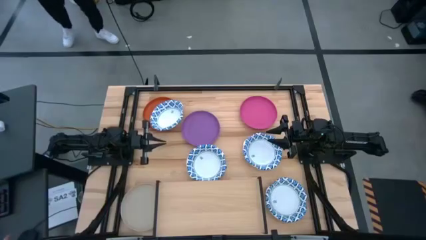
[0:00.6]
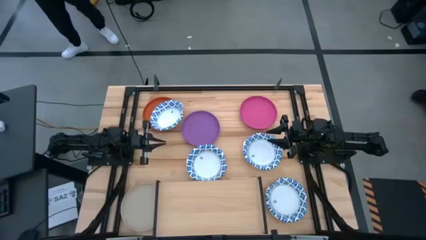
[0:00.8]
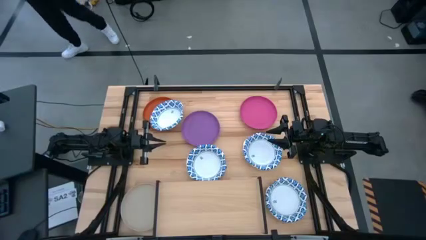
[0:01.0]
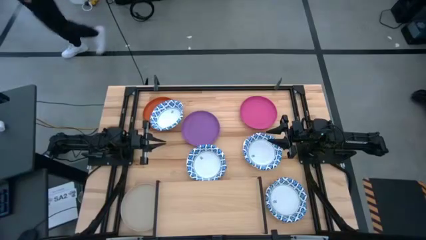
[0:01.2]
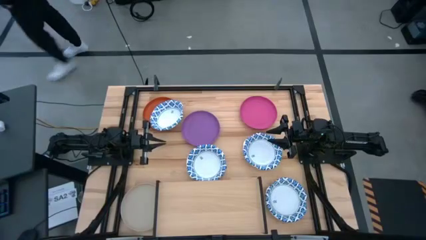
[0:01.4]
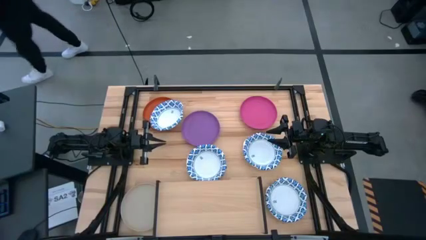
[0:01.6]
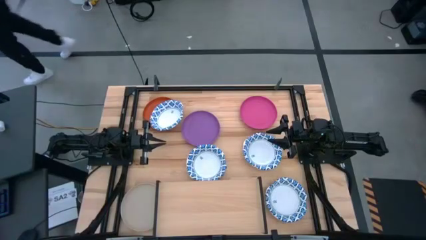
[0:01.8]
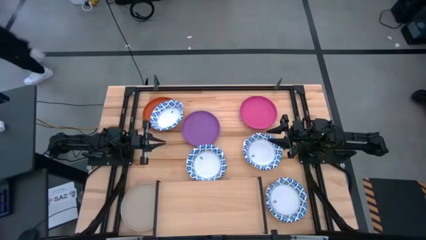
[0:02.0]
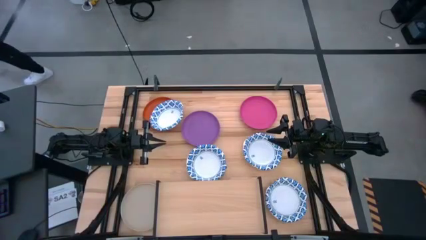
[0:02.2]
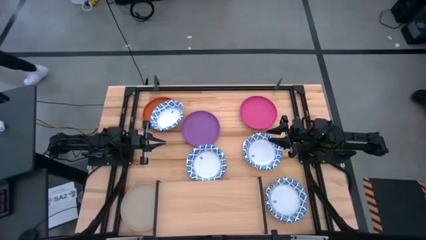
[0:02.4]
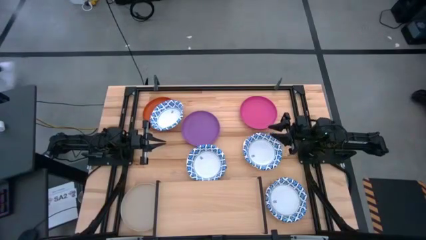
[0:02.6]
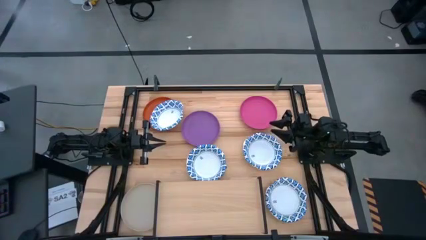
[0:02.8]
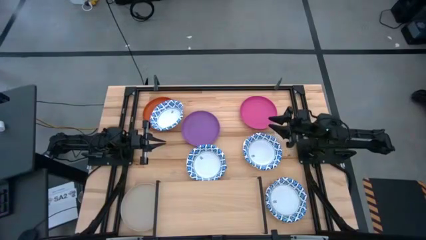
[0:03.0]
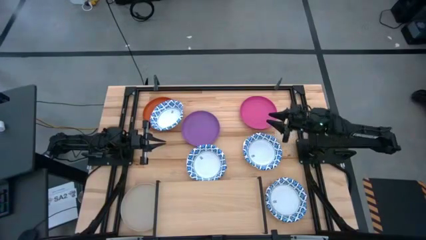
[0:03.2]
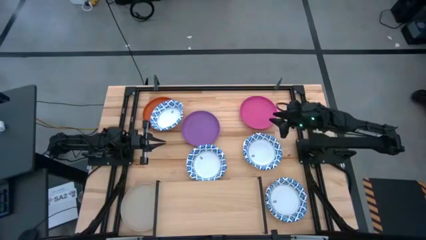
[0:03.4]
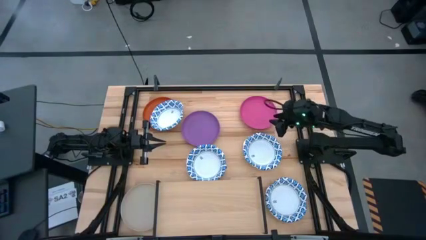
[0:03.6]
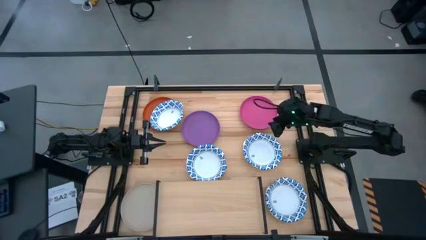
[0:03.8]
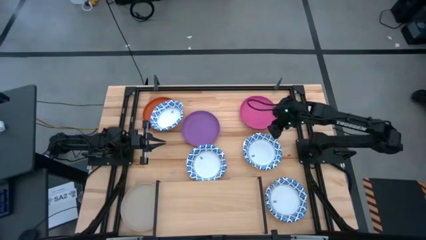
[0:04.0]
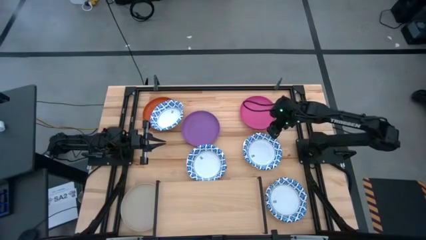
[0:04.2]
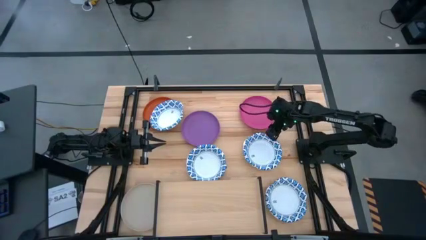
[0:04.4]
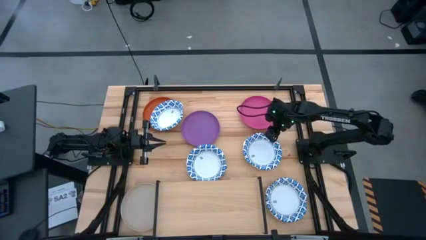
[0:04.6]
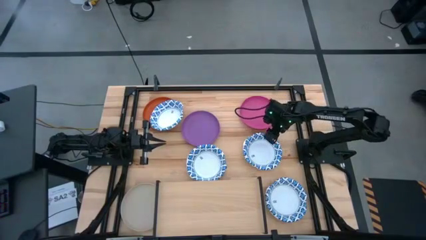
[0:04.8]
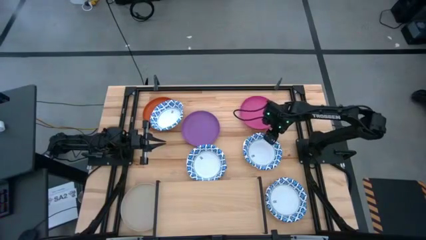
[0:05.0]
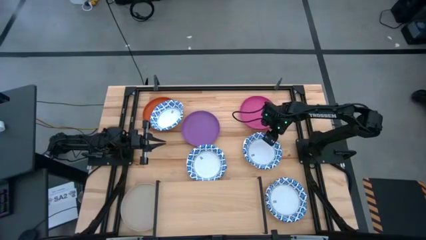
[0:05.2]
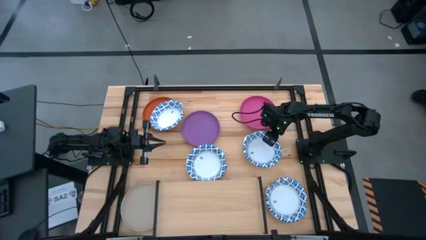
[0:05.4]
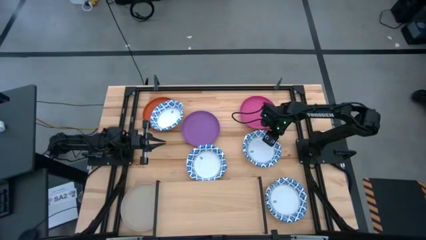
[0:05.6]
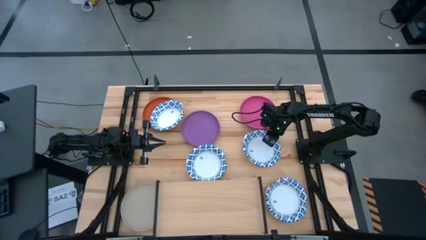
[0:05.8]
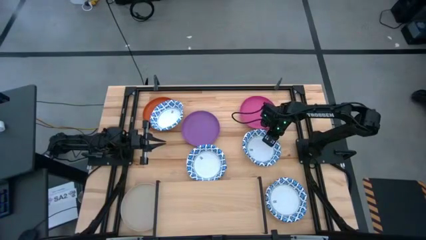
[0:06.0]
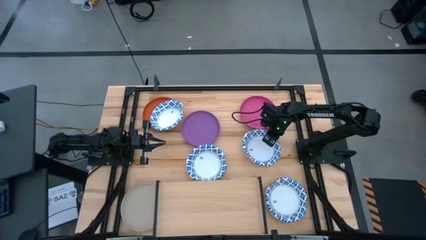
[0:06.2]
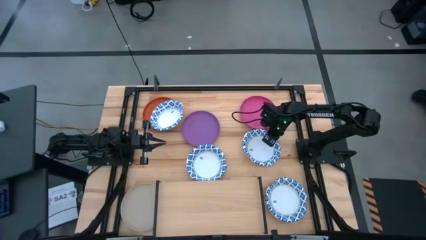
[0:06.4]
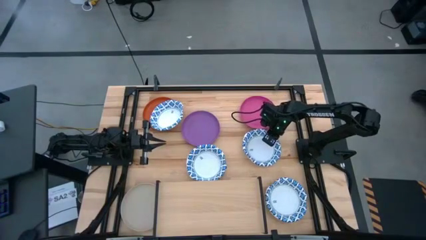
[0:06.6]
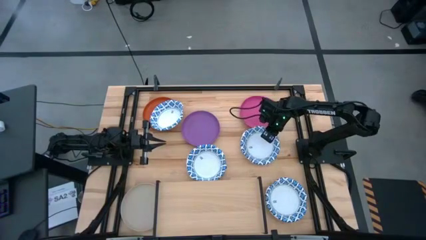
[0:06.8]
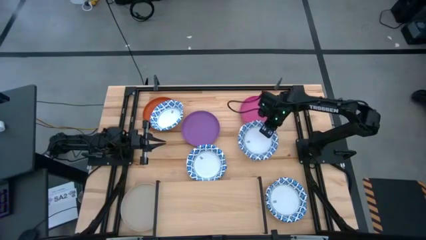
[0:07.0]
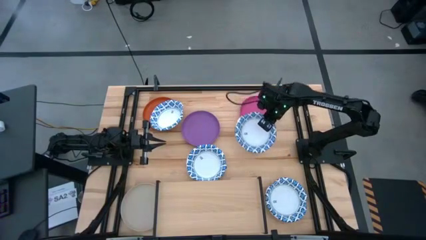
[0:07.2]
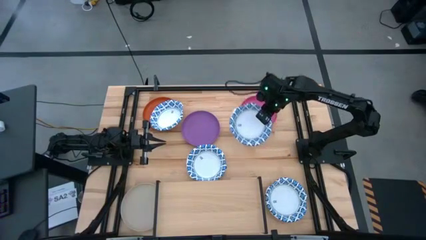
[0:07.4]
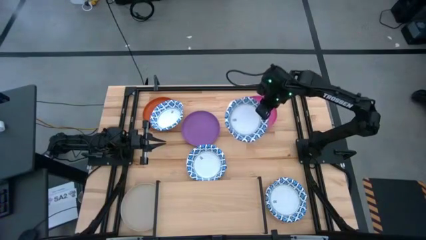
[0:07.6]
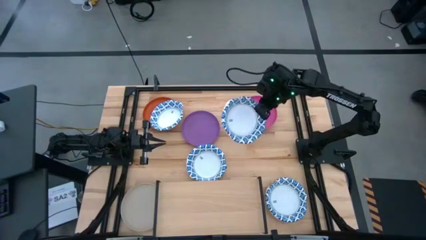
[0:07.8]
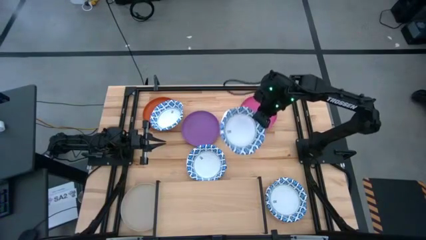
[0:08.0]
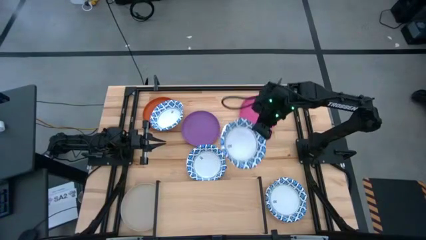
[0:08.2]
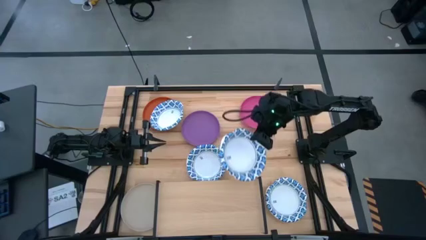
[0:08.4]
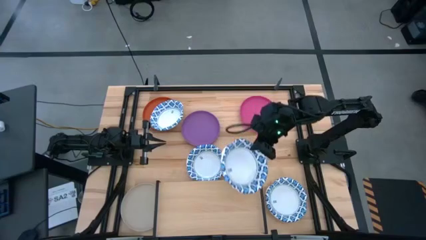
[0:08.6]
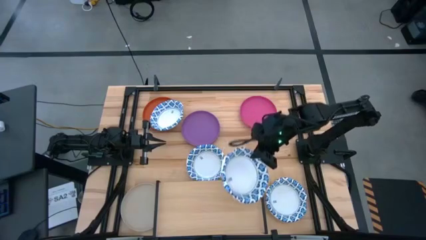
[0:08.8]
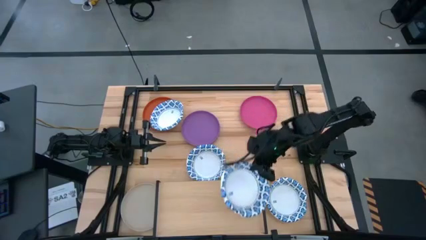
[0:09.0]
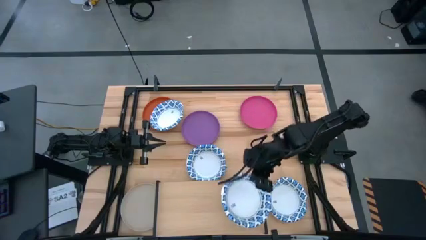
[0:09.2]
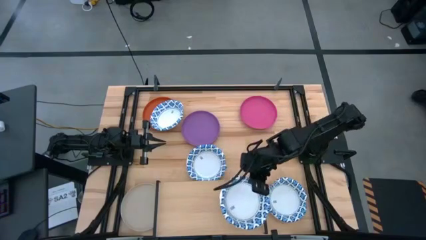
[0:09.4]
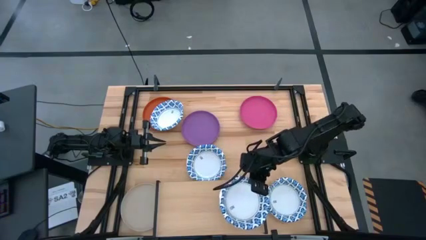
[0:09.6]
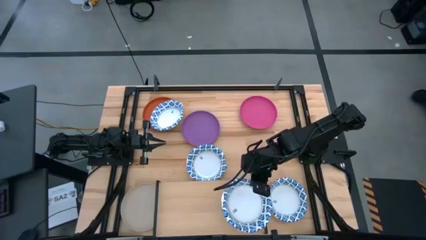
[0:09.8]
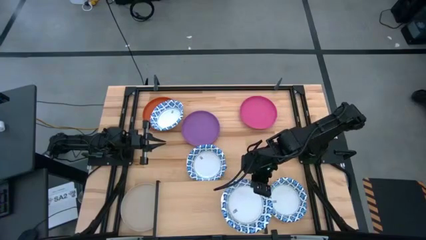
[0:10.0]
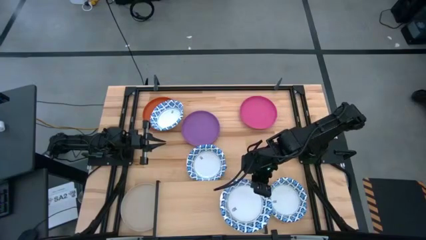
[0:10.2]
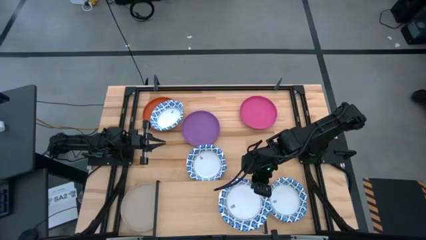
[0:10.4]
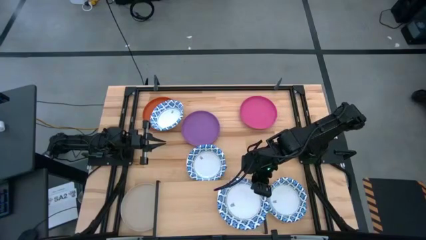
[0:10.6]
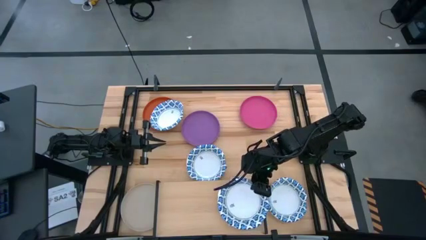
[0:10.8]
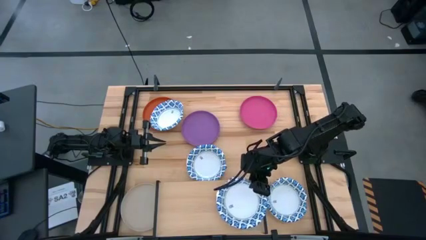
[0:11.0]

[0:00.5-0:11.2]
Task: Place and stack plates onto a shelf
Put the white bowl on the shelf
